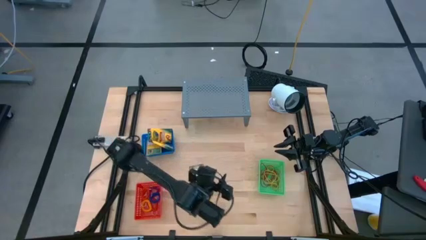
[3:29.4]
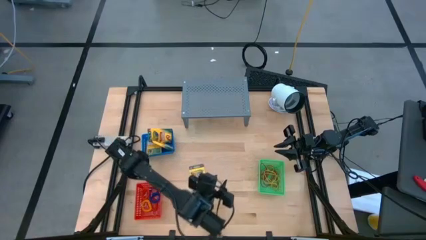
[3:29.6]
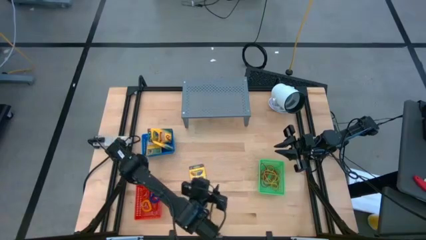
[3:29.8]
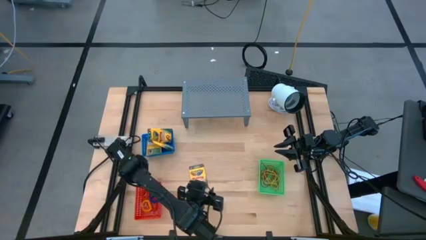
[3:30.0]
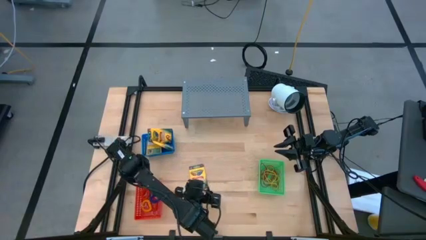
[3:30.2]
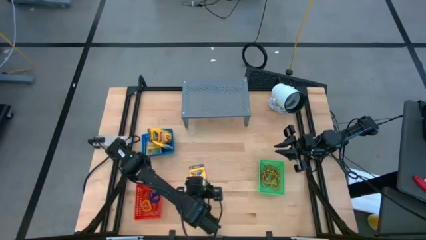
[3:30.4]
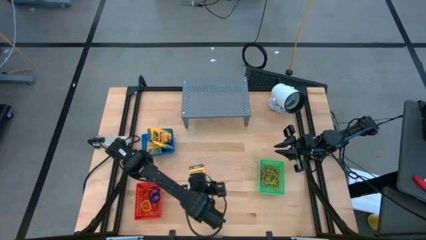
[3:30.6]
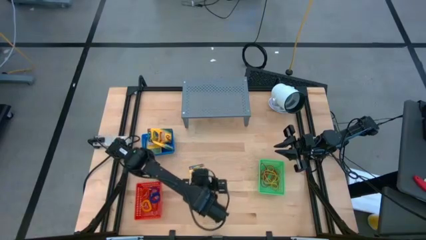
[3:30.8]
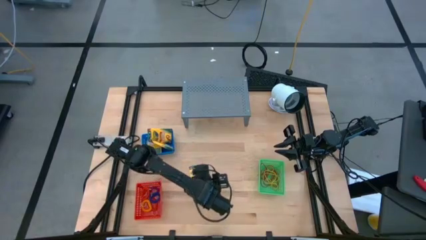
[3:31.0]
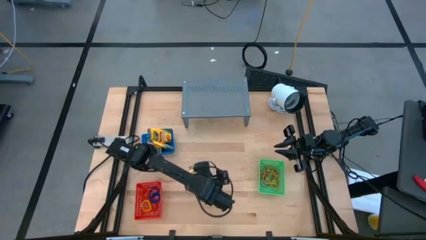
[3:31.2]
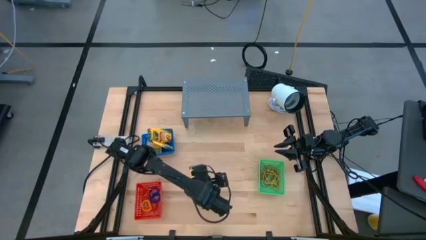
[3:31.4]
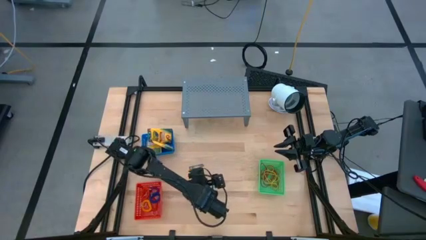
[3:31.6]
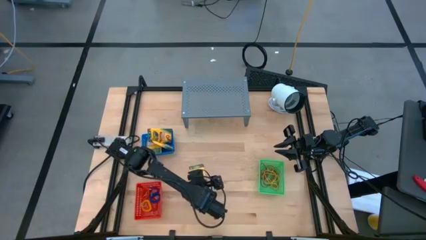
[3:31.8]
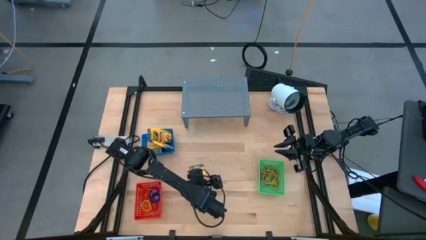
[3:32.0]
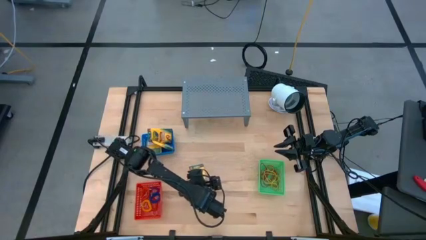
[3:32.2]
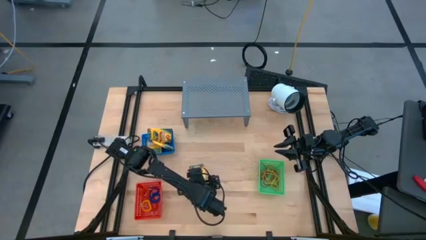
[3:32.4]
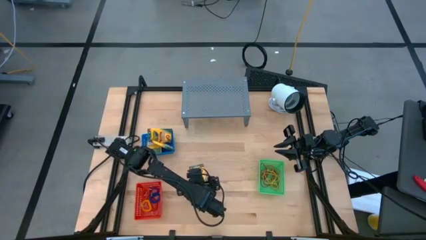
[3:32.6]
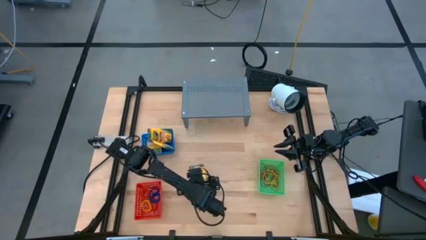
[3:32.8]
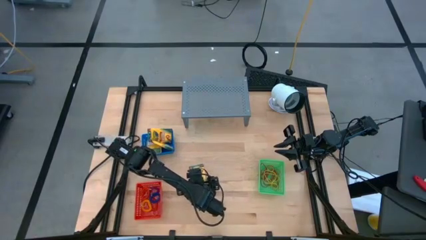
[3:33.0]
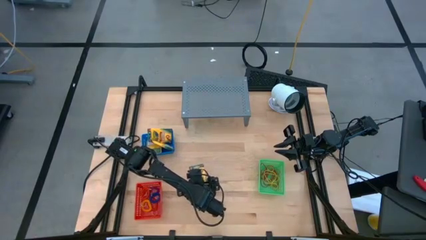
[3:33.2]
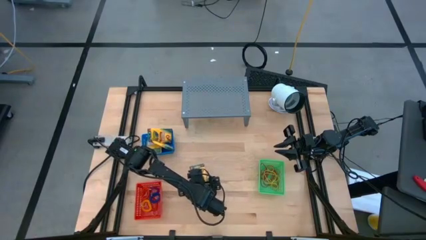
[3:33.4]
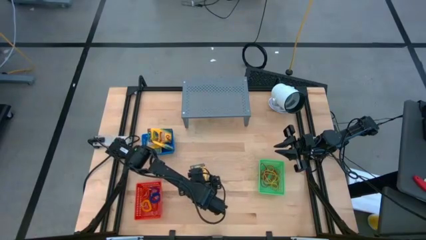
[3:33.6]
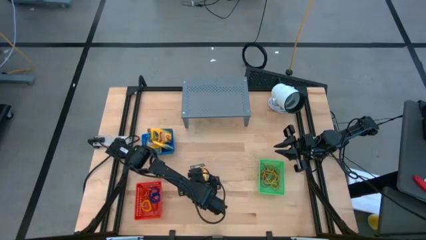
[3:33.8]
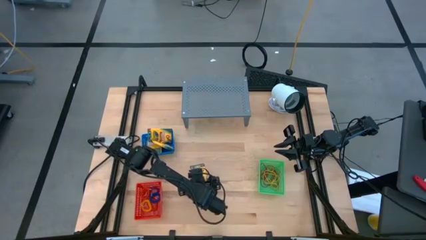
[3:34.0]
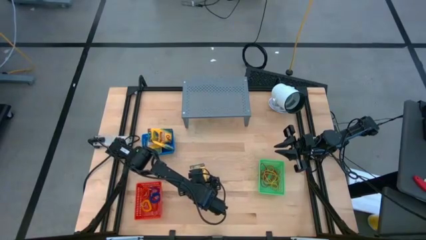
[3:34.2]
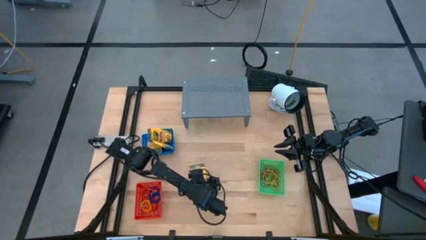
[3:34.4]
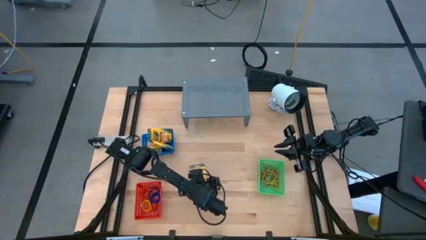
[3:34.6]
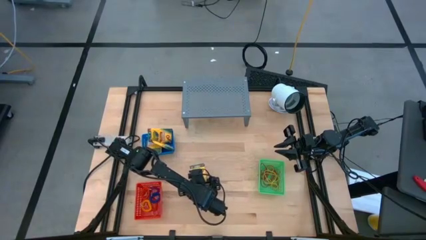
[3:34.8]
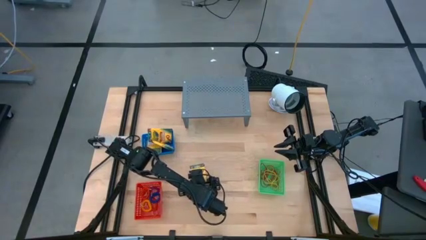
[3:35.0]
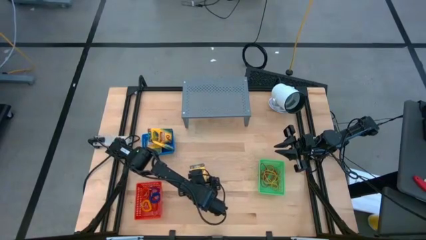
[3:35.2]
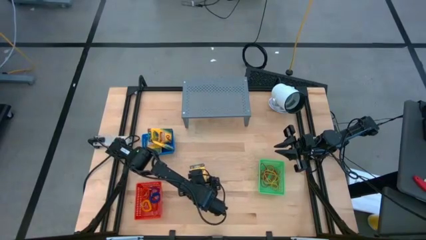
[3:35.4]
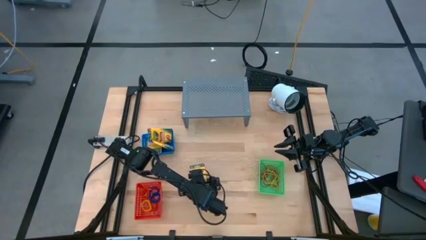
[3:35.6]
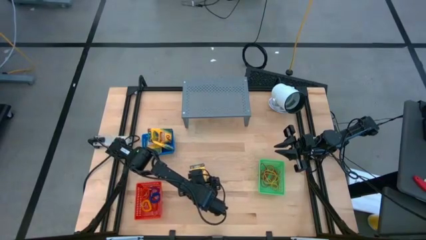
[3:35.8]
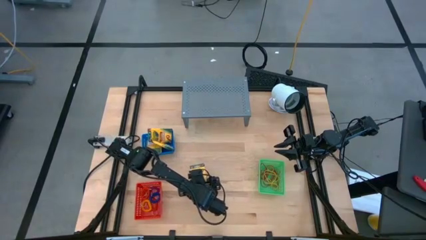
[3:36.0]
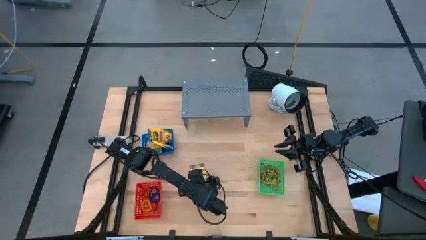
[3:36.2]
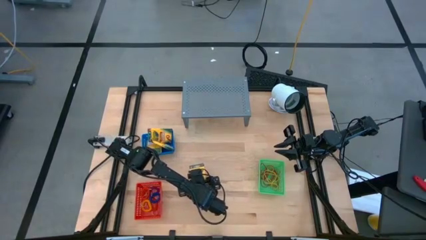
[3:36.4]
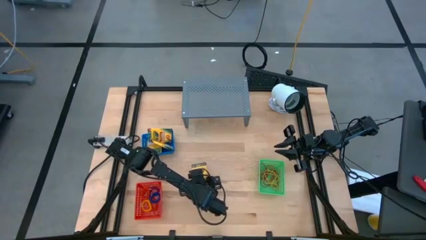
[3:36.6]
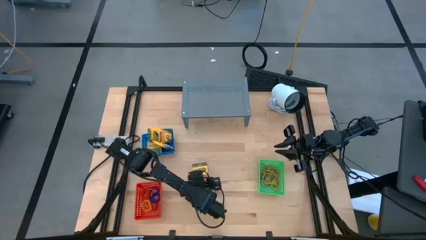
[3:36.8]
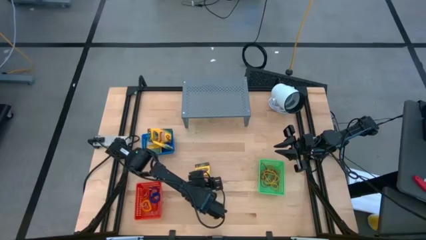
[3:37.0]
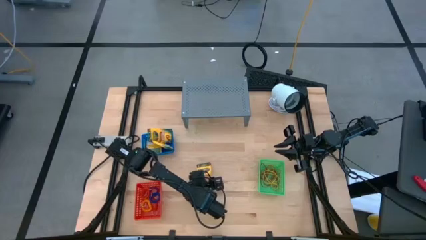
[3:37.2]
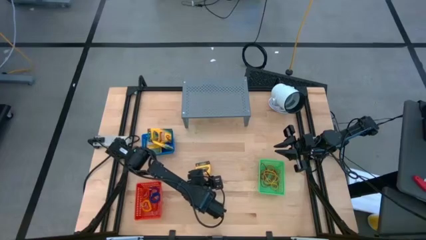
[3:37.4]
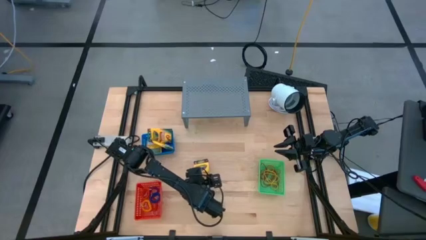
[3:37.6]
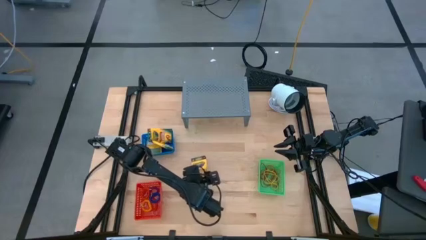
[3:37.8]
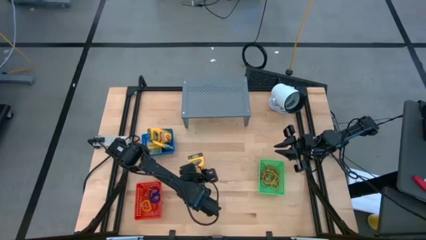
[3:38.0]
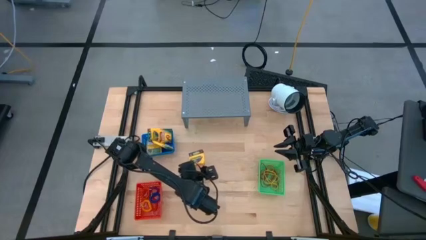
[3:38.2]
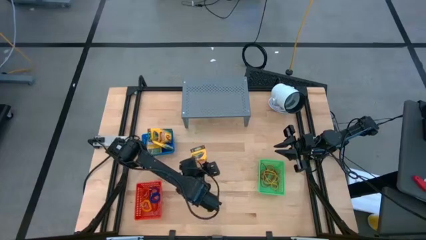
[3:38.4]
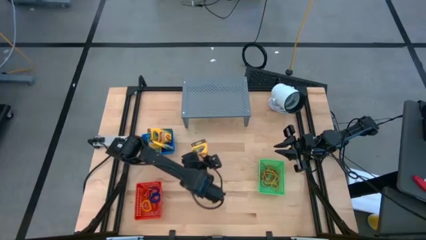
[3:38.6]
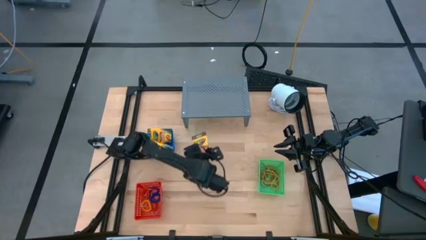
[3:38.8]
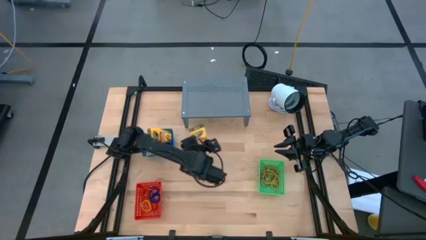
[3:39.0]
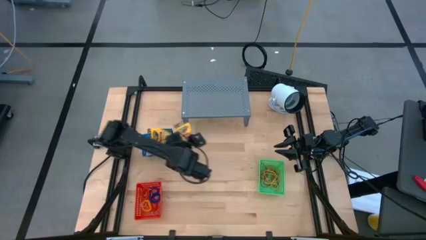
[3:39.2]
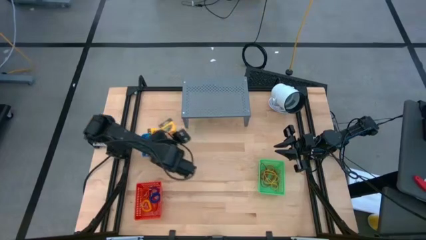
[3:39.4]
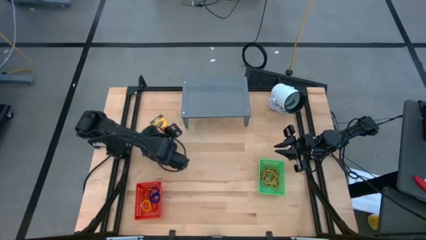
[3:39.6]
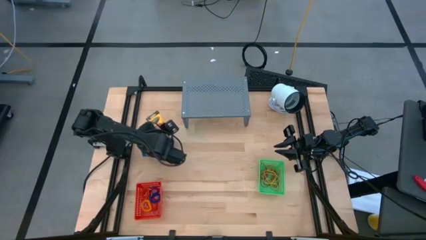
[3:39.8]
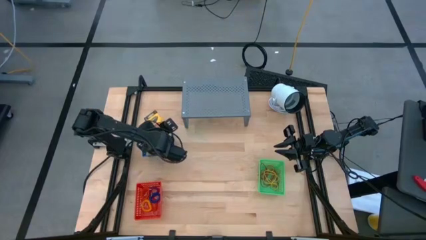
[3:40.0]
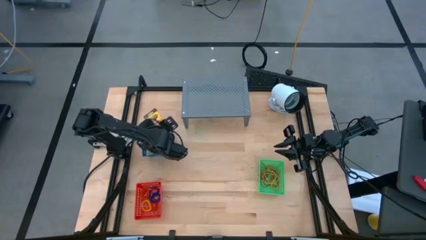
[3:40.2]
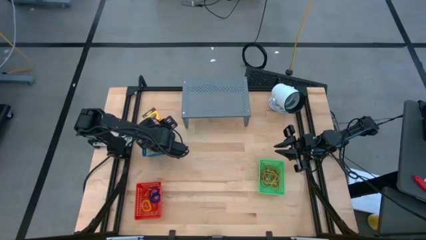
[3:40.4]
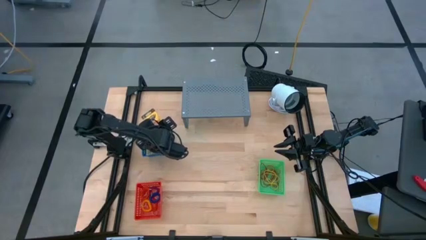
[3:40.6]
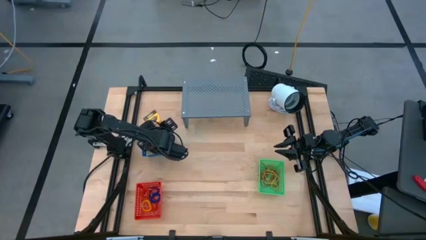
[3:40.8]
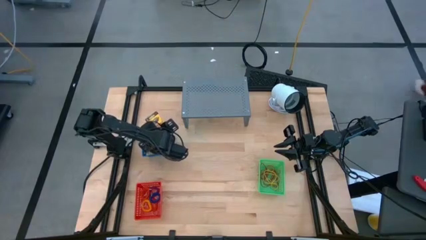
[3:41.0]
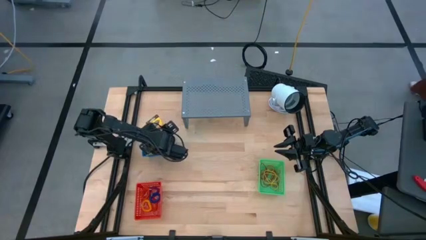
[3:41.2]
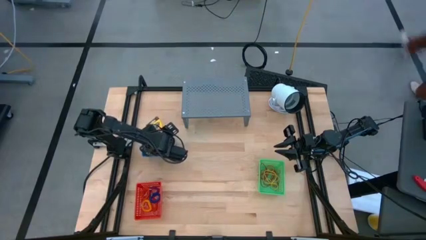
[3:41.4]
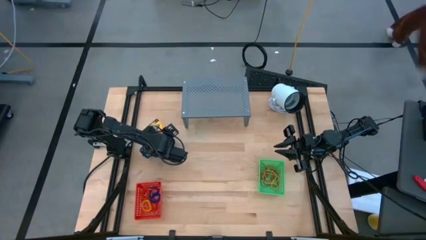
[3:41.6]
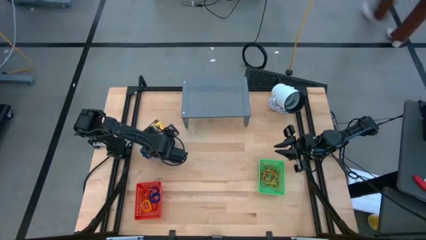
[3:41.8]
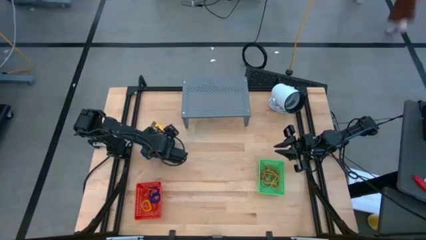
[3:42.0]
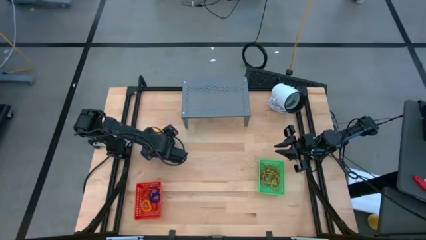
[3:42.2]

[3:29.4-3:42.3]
Task: Pick & Place Office Desk Supplies
Put the yellow crayon box into the blue bin

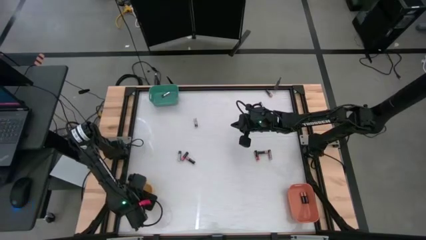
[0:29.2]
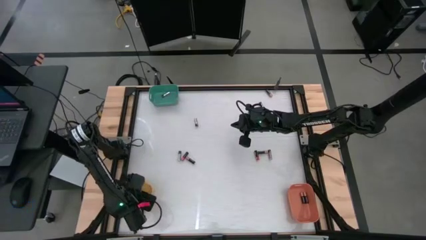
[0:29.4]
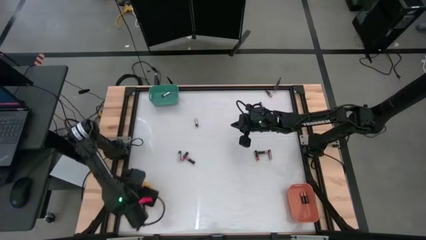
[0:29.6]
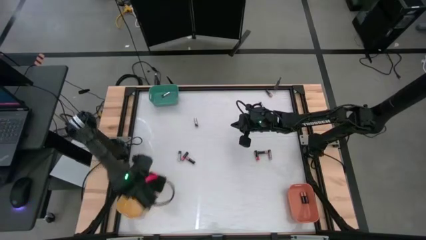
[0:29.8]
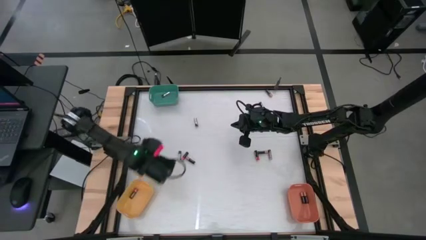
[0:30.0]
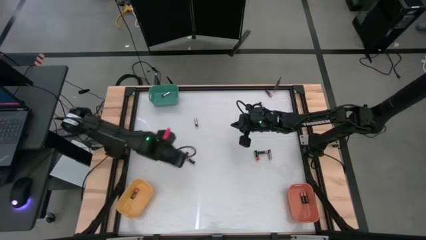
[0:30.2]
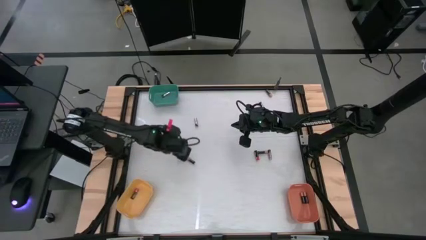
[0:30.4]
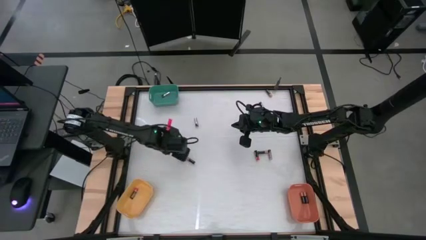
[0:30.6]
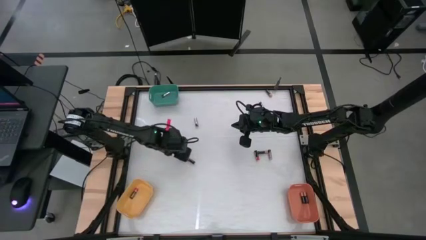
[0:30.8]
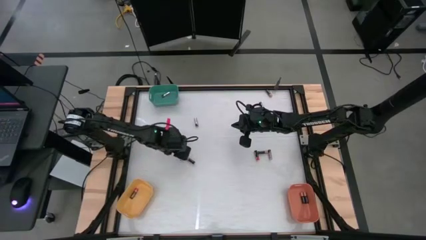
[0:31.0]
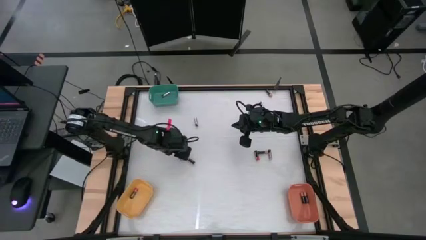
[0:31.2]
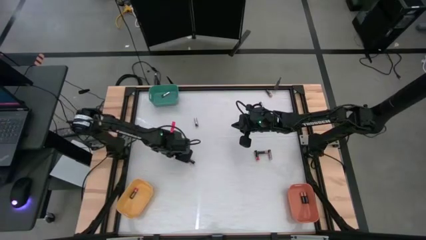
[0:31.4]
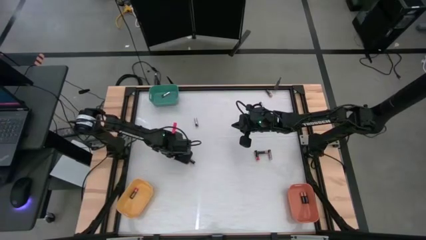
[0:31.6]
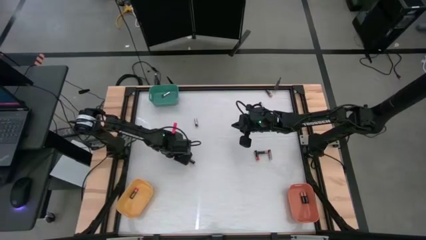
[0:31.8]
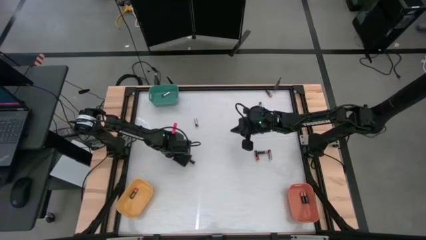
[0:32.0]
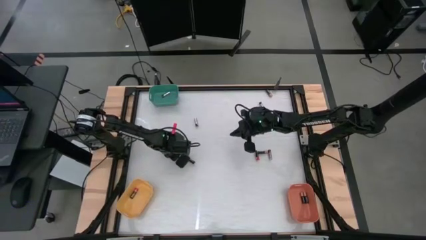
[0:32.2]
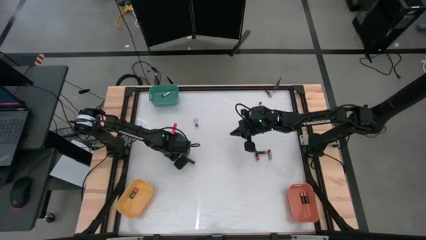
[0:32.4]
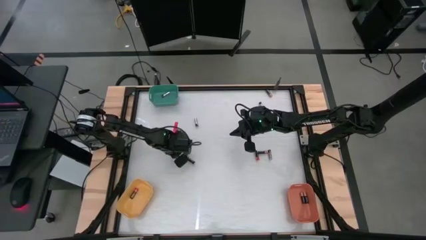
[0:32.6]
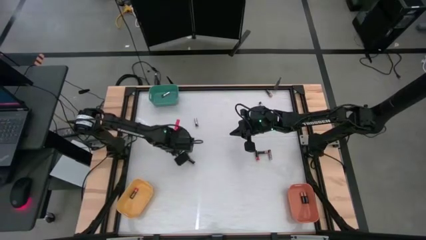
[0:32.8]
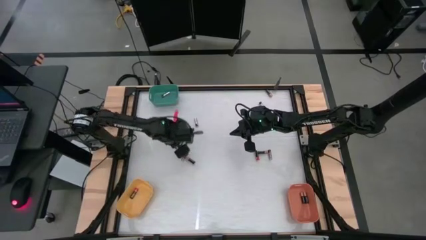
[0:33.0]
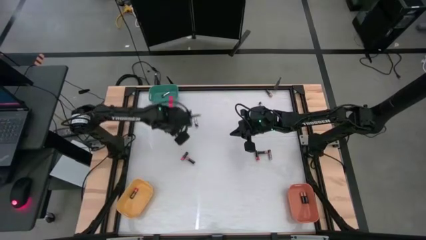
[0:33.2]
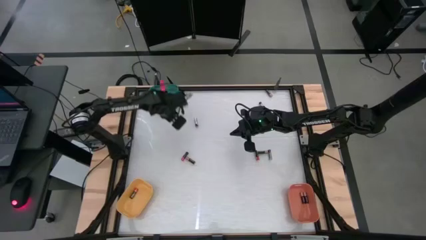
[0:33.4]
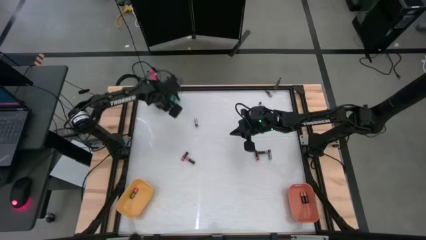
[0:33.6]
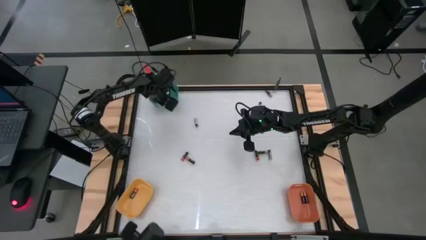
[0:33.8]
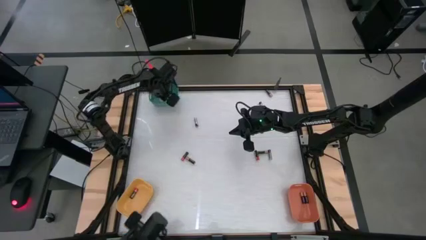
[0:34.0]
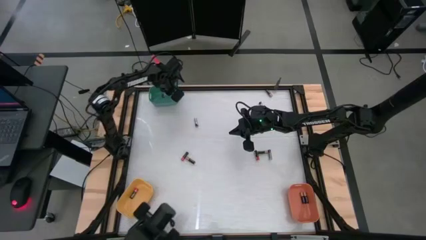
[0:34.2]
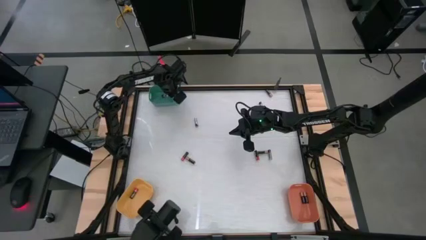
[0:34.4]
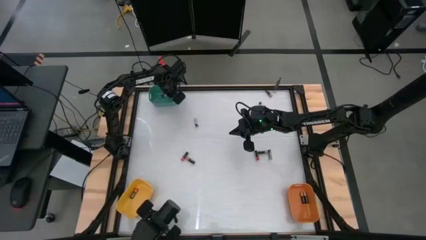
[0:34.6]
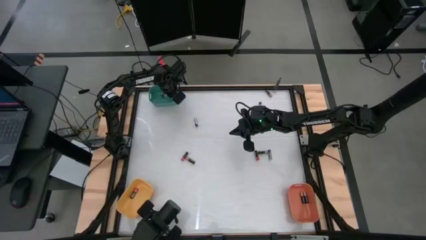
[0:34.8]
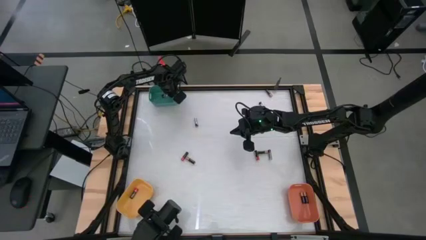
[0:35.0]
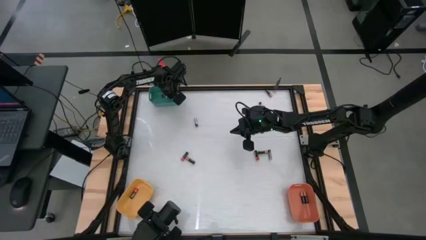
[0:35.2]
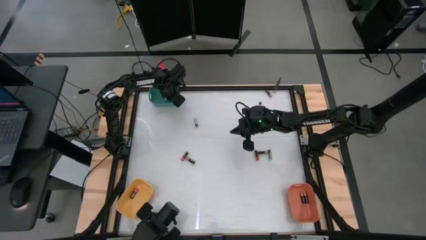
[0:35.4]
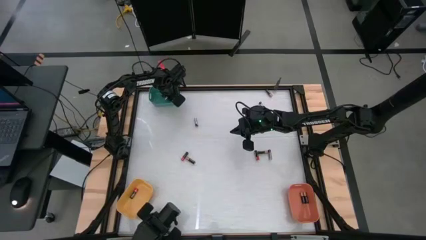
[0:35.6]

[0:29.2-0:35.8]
Task: Sort batteries
Put the middle left silver battery into the blue bin
